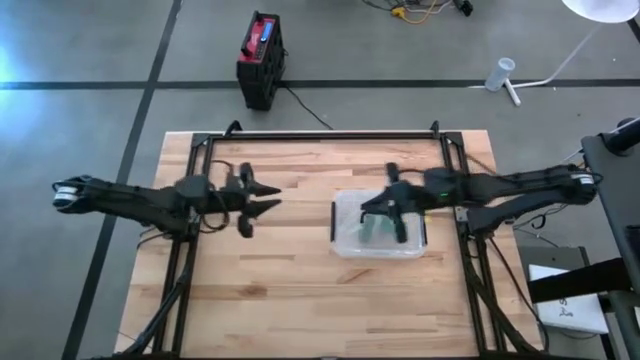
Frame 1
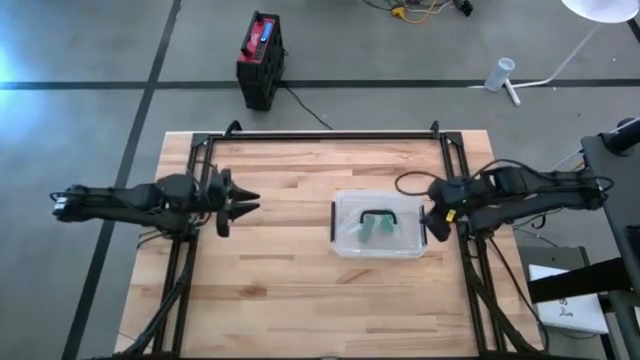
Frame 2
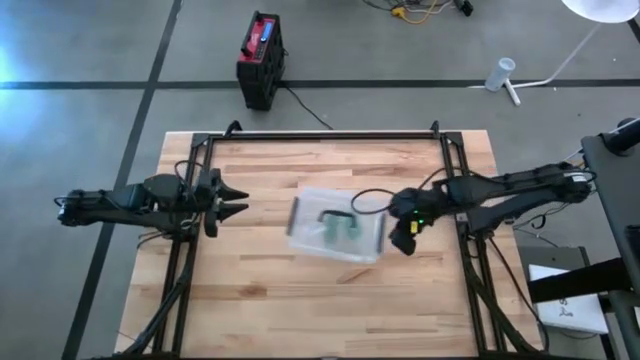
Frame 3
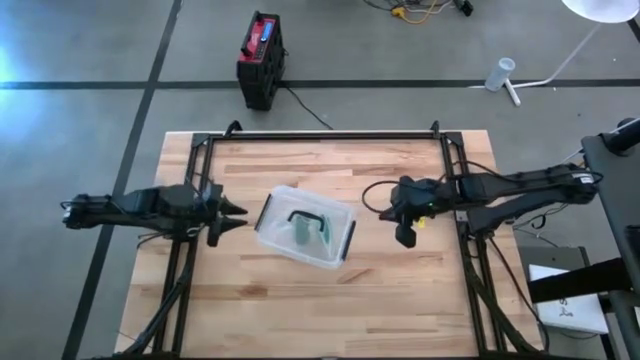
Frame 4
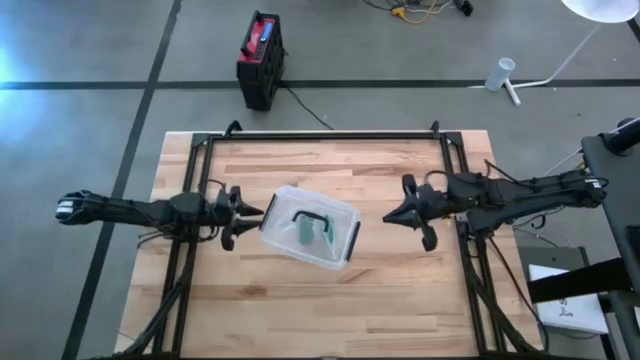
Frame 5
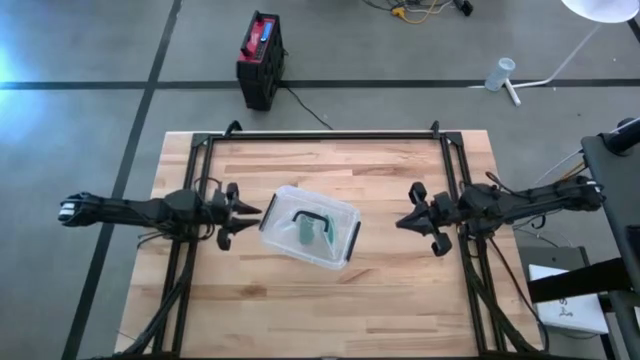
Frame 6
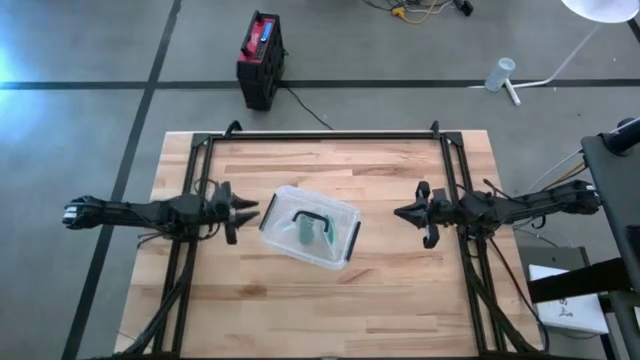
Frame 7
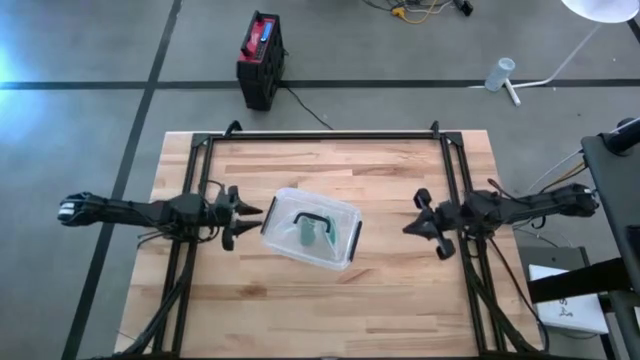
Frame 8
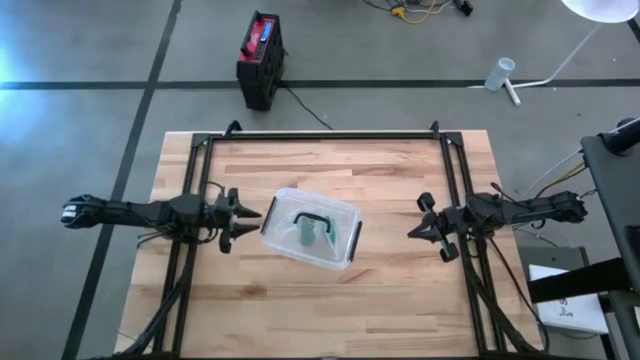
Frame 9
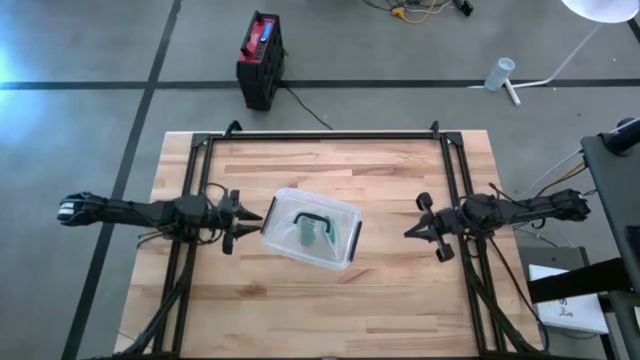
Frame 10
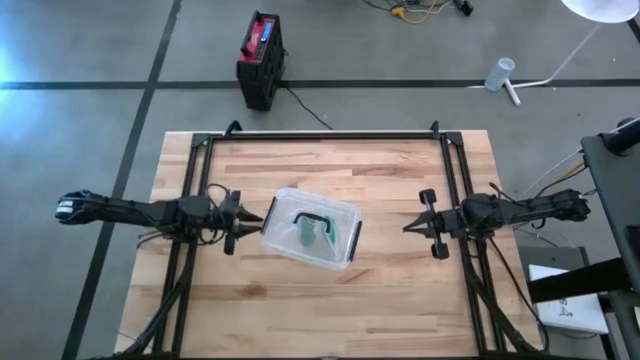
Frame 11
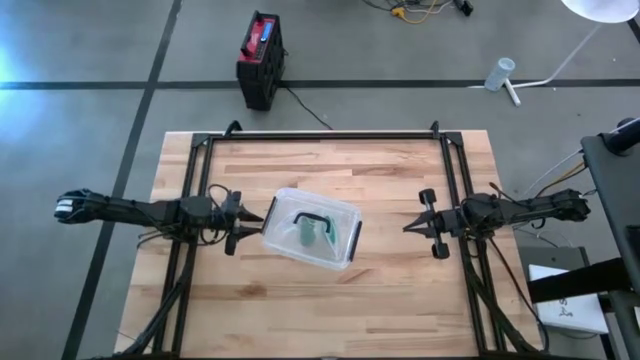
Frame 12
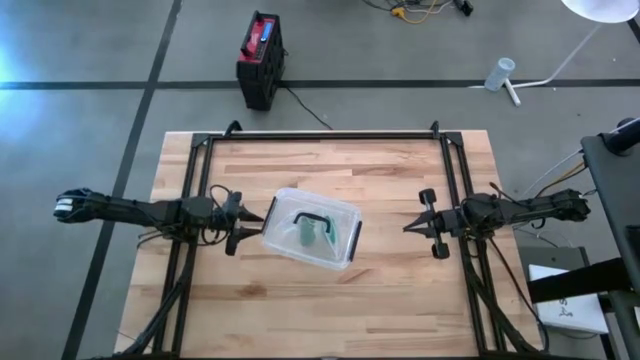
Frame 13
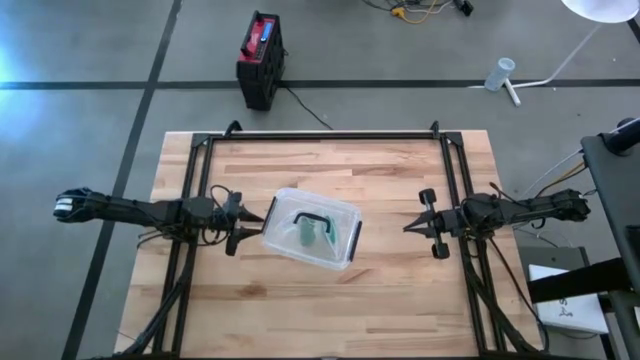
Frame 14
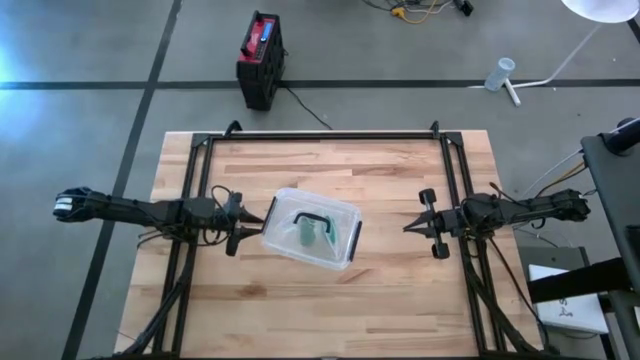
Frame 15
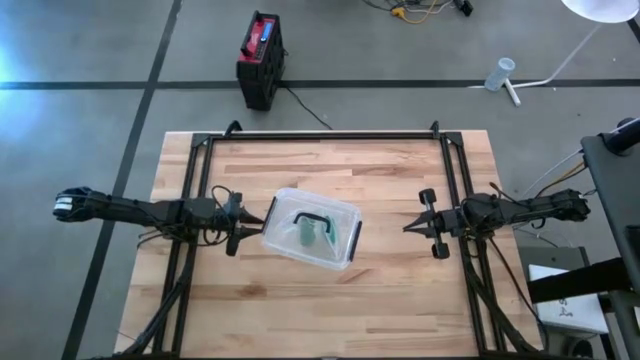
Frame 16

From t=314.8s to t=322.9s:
Task: Roll bandage
Return to Home Position

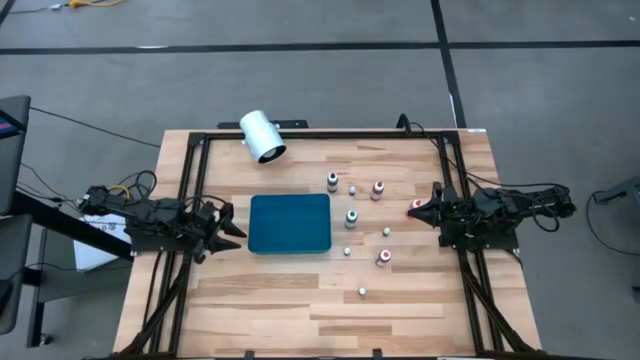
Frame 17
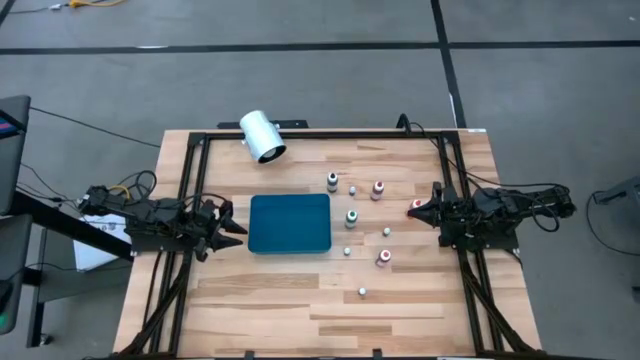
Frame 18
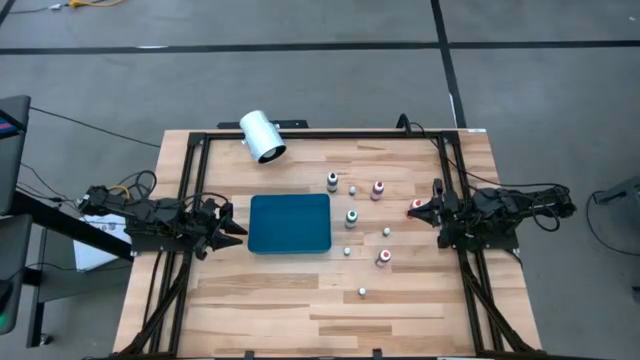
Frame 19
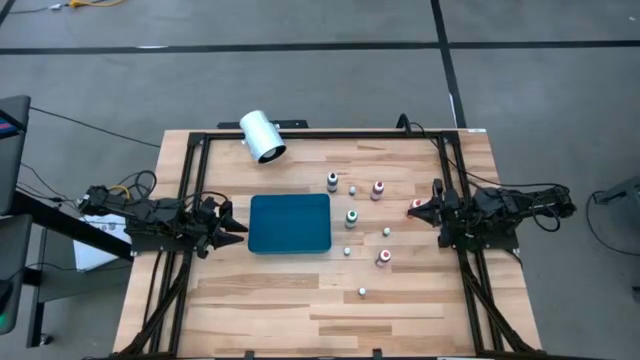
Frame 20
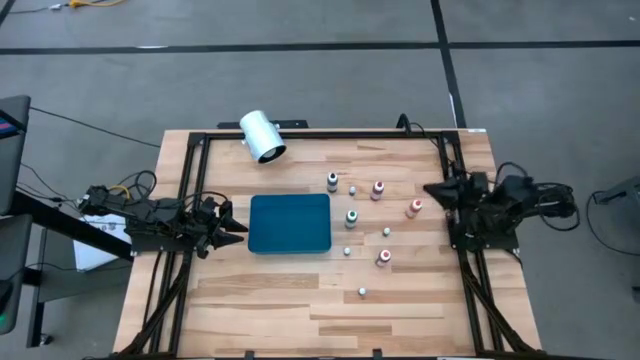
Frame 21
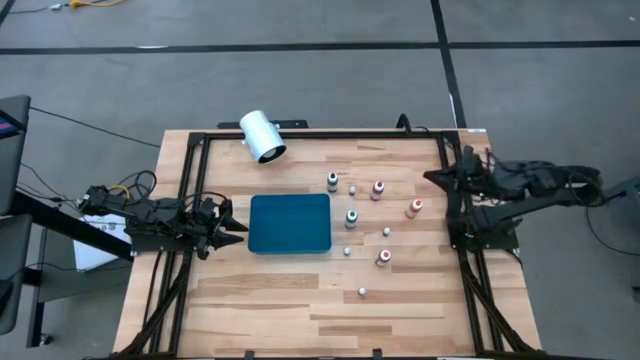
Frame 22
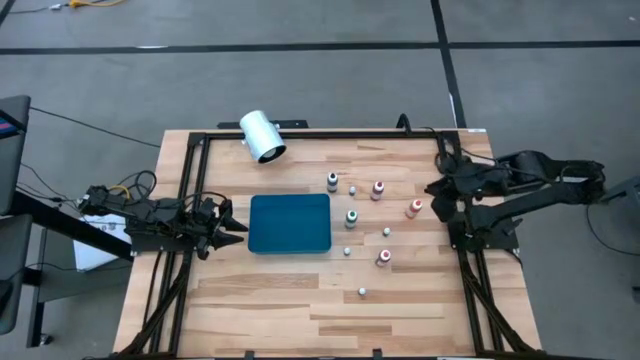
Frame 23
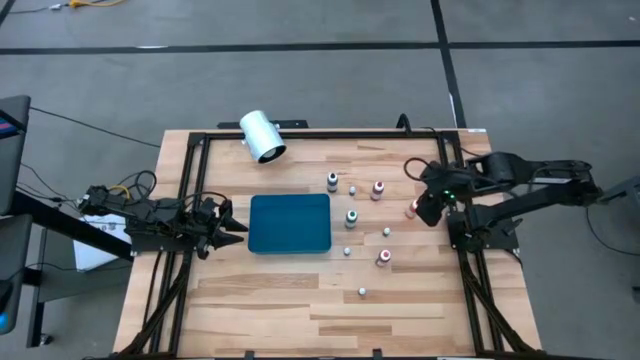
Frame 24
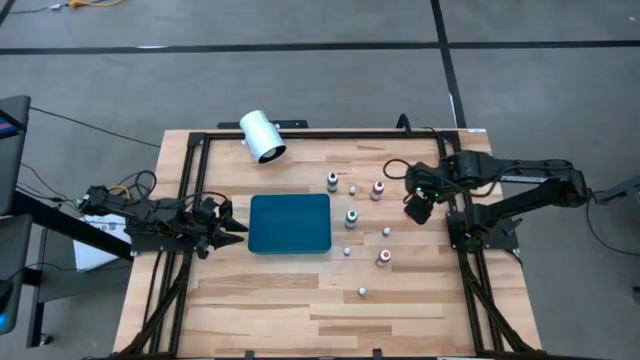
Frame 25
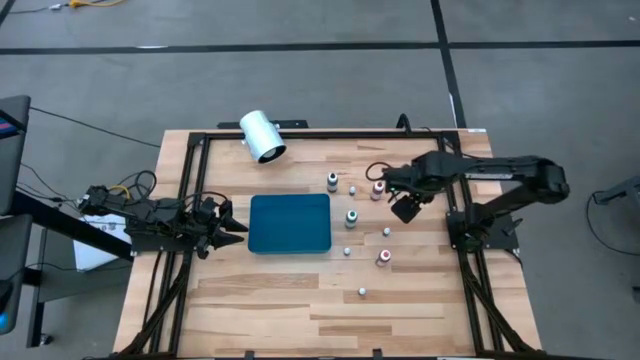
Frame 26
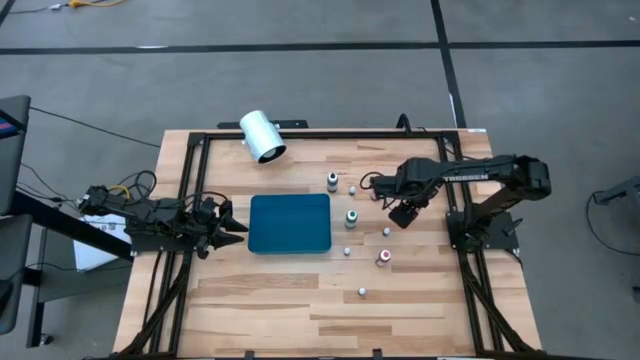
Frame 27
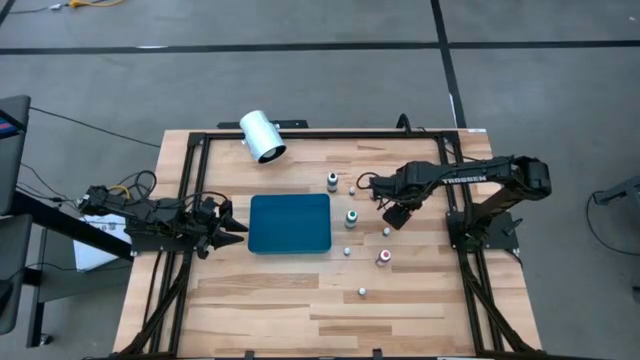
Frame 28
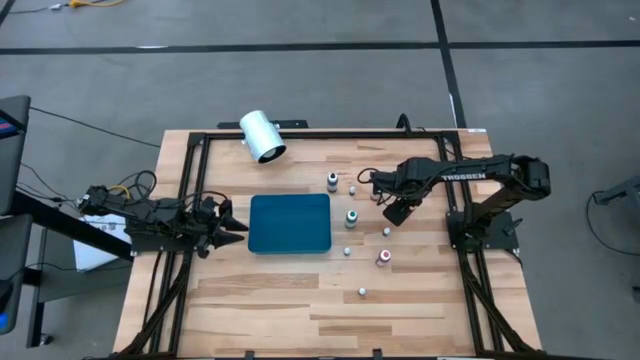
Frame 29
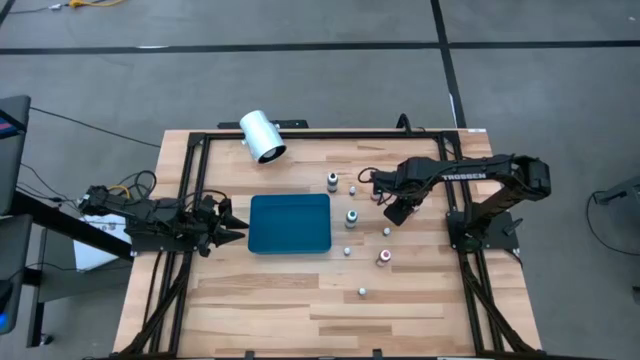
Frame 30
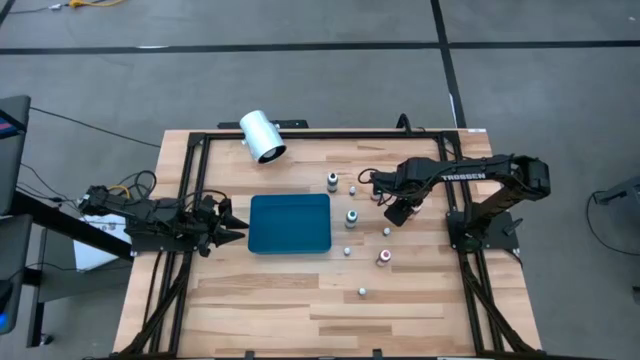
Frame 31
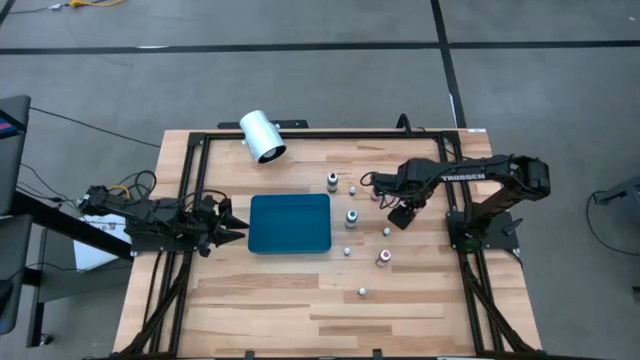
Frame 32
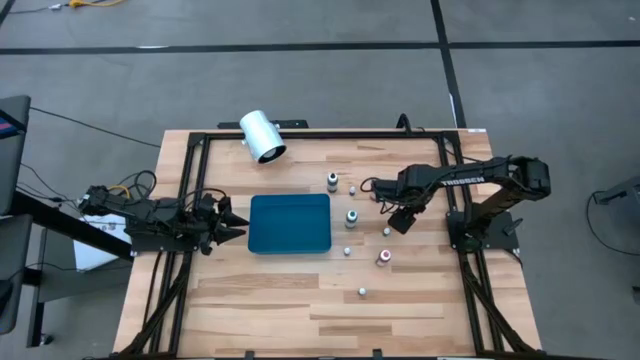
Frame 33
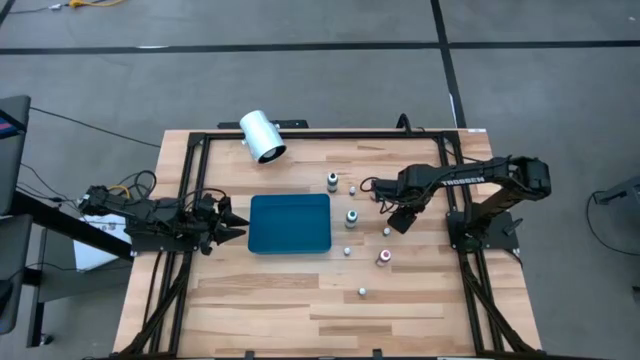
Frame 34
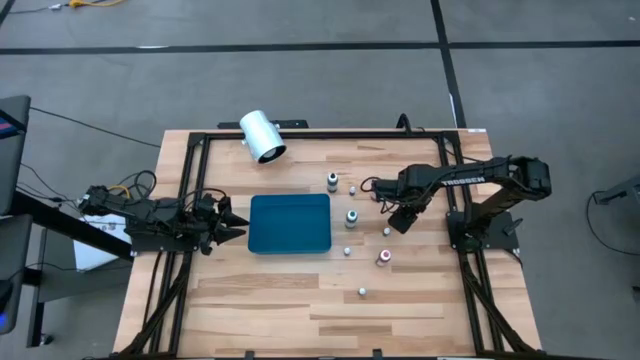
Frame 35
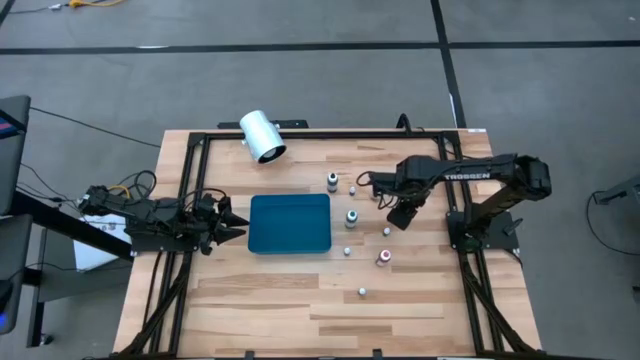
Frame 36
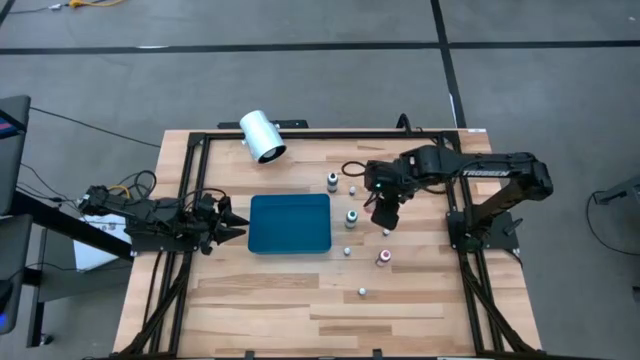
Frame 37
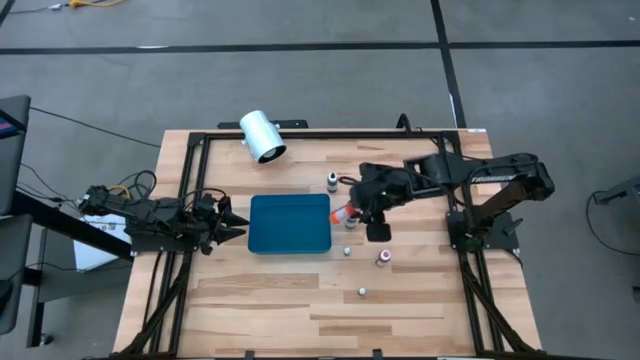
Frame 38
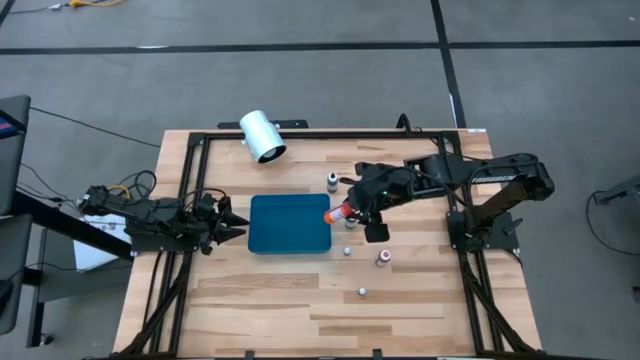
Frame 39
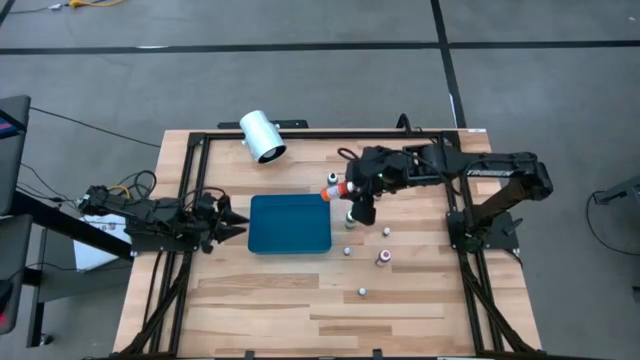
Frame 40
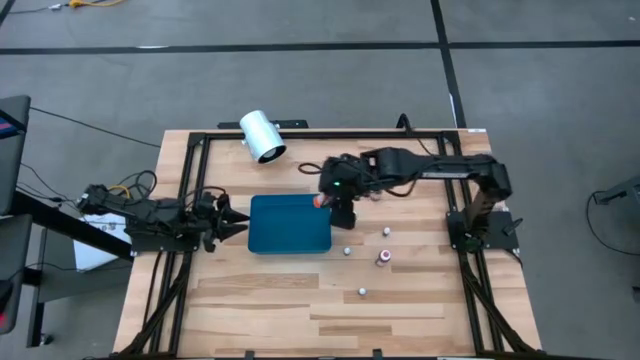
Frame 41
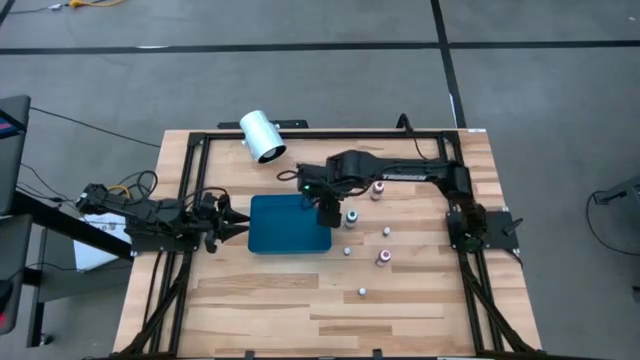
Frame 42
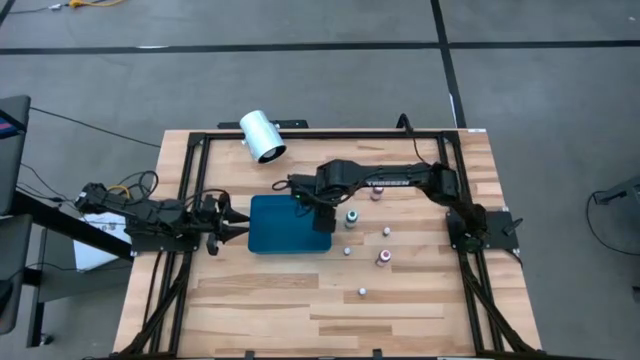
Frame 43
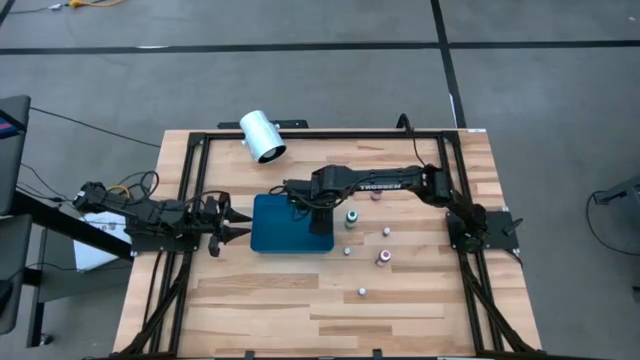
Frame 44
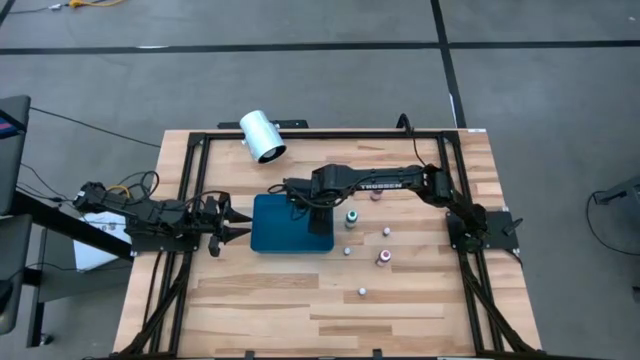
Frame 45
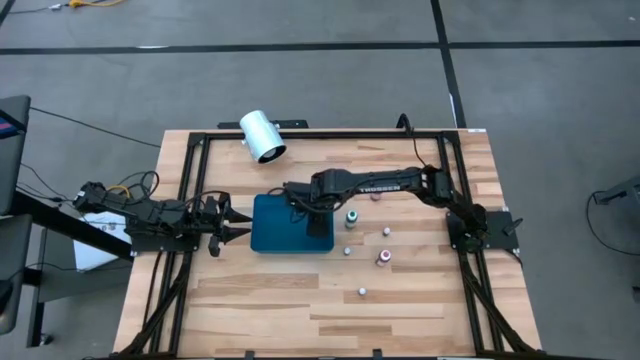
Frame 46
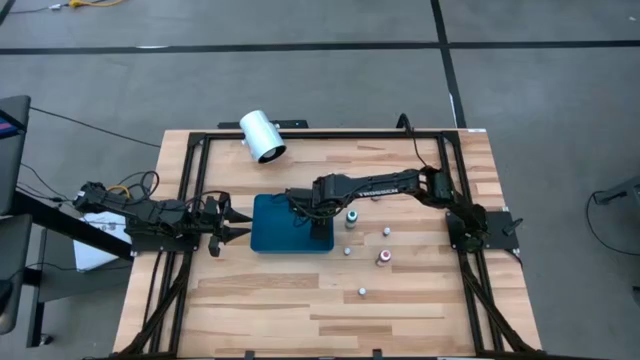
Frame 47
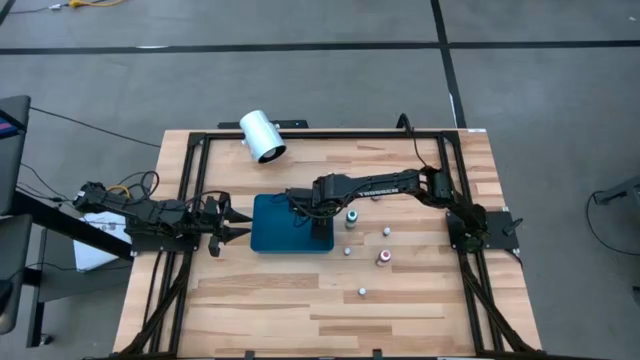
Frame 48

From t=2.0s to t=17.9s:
Task: Pick & Place food coloring
Put the large orange food coloring bottle into the bin
